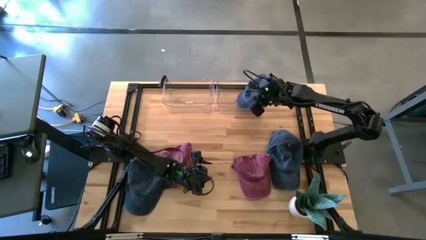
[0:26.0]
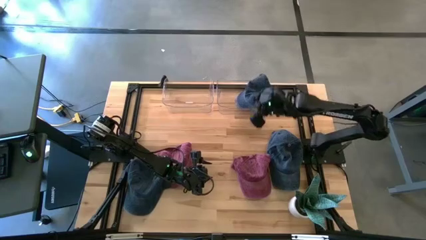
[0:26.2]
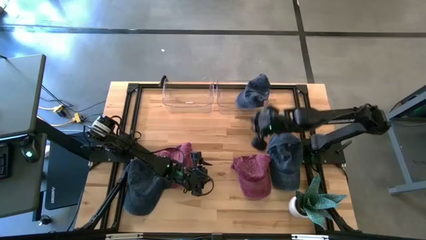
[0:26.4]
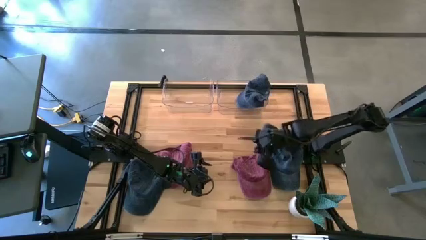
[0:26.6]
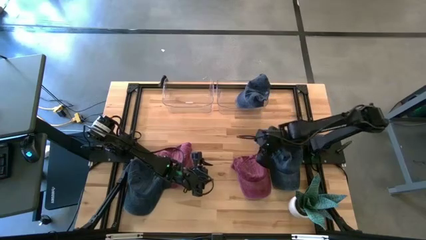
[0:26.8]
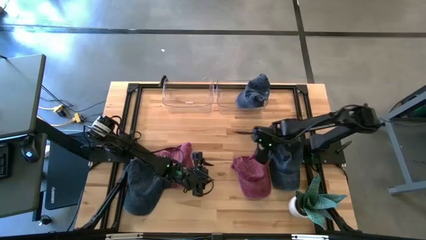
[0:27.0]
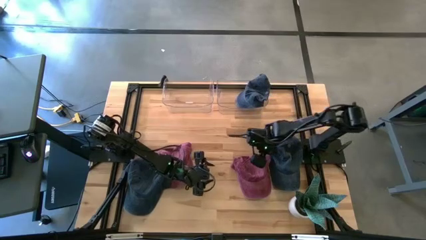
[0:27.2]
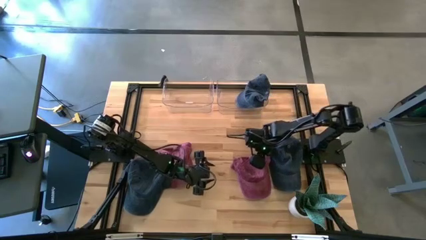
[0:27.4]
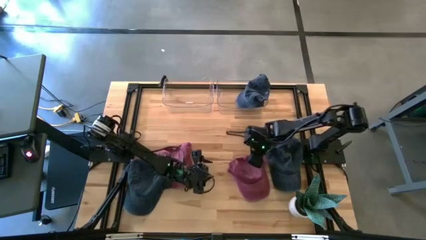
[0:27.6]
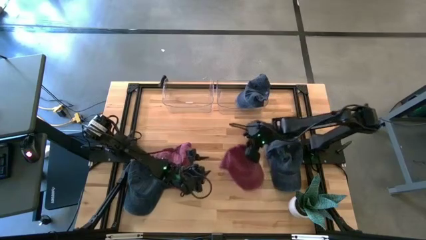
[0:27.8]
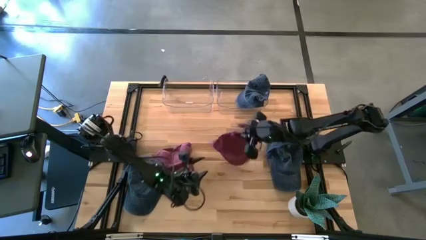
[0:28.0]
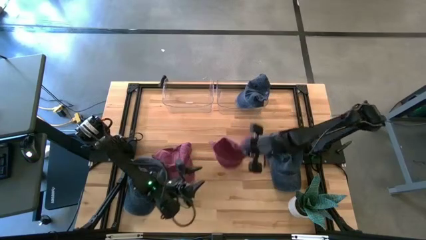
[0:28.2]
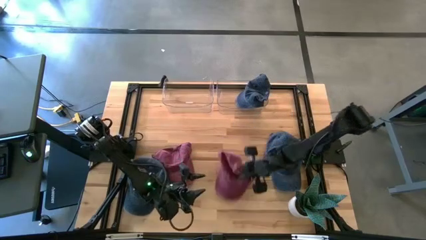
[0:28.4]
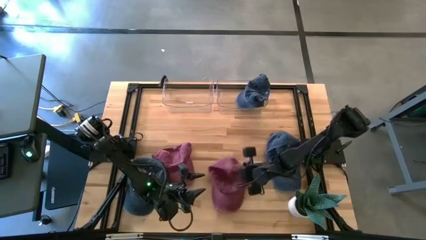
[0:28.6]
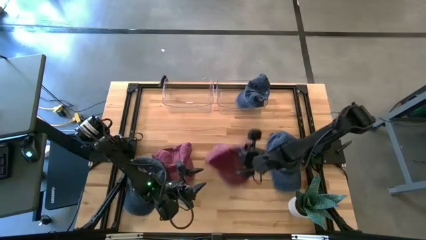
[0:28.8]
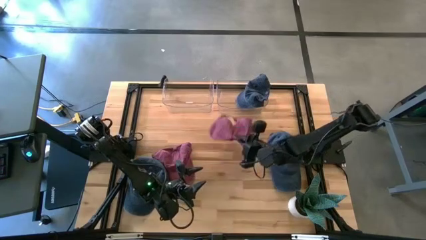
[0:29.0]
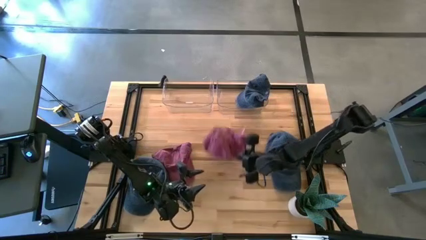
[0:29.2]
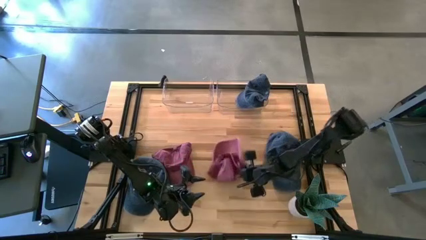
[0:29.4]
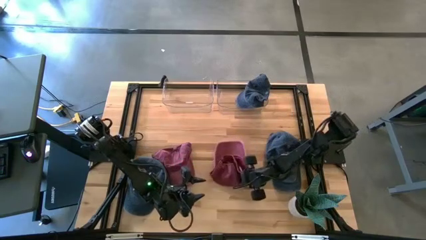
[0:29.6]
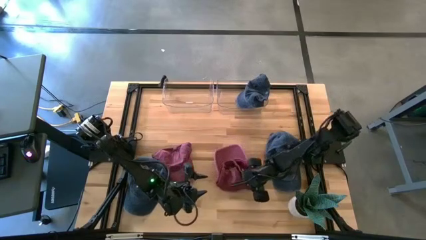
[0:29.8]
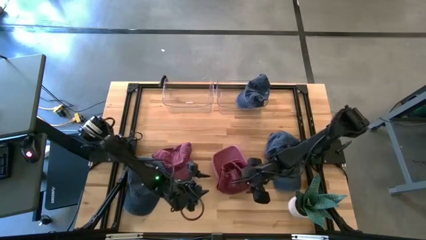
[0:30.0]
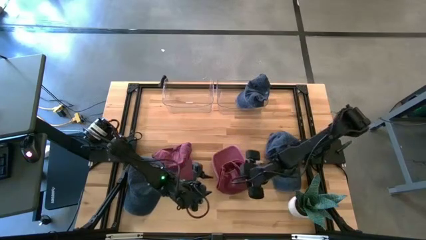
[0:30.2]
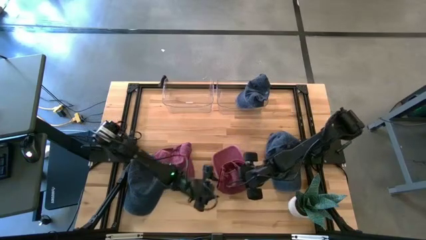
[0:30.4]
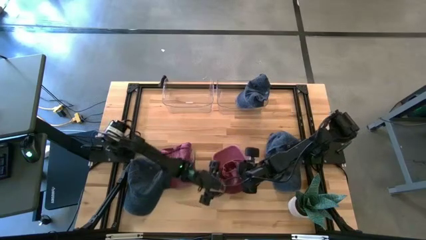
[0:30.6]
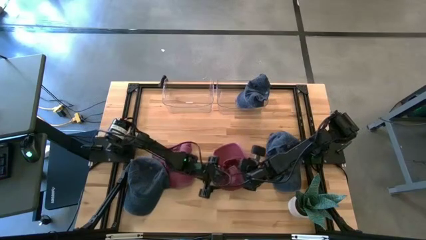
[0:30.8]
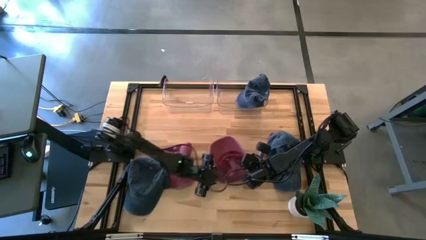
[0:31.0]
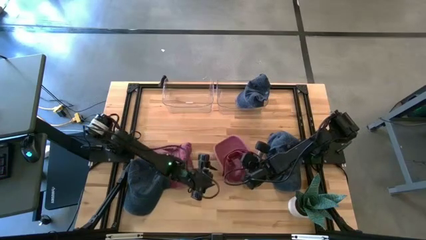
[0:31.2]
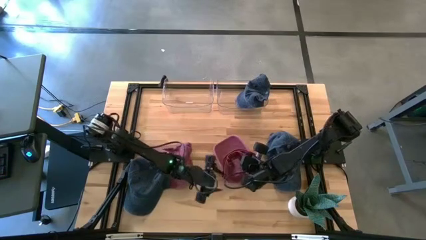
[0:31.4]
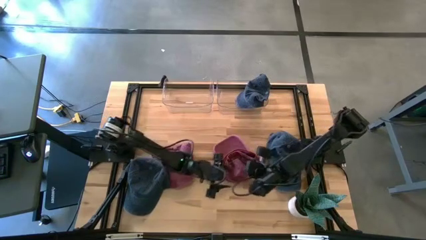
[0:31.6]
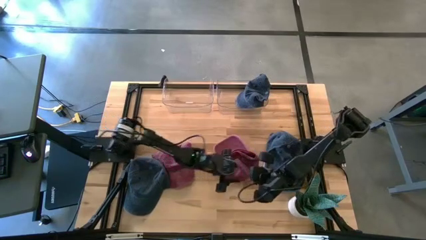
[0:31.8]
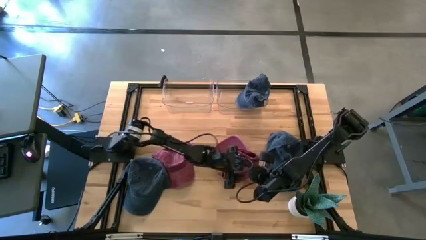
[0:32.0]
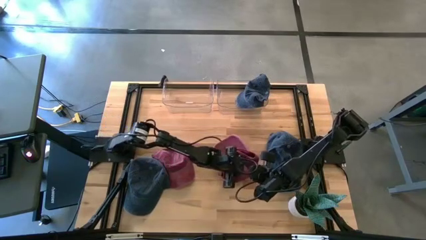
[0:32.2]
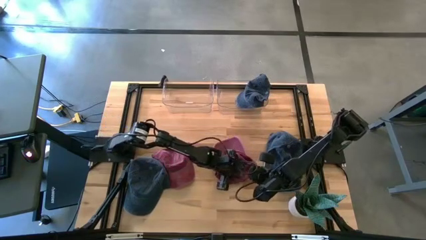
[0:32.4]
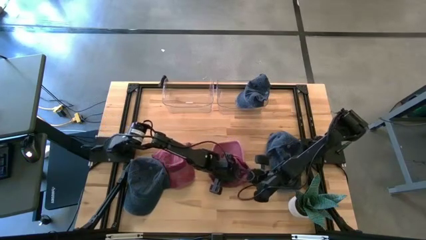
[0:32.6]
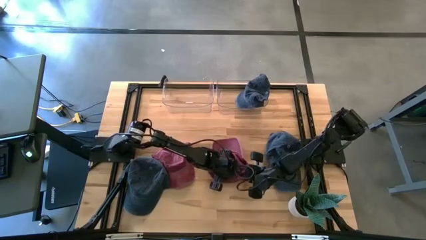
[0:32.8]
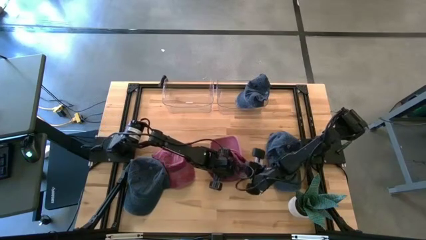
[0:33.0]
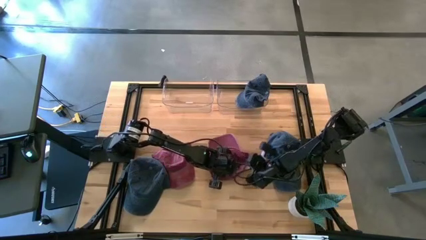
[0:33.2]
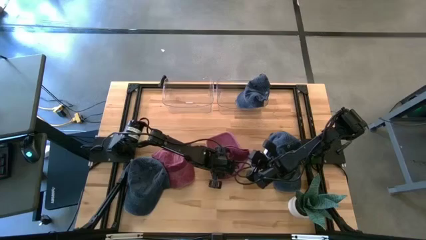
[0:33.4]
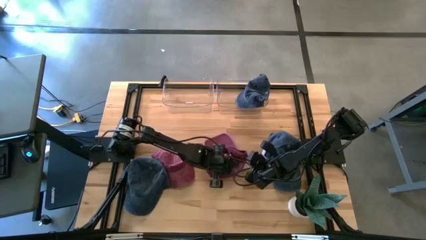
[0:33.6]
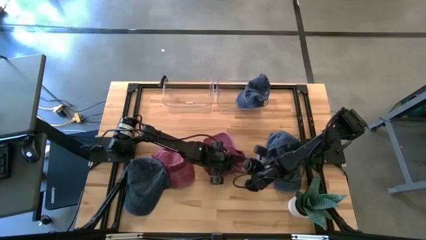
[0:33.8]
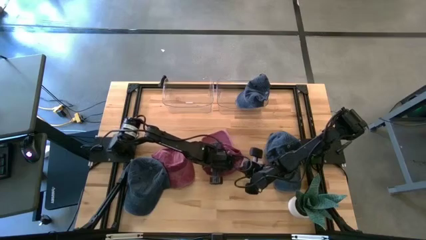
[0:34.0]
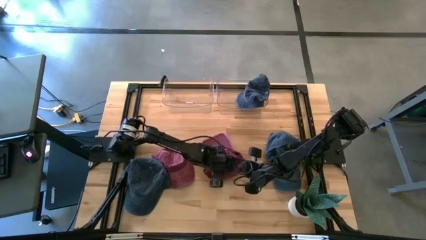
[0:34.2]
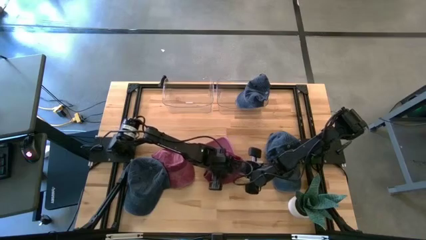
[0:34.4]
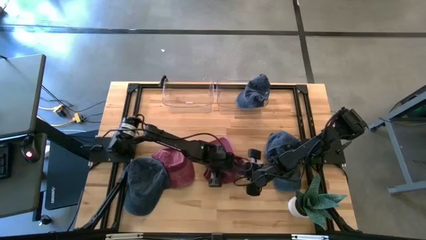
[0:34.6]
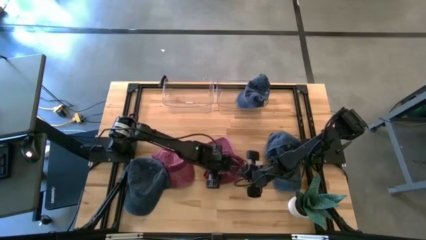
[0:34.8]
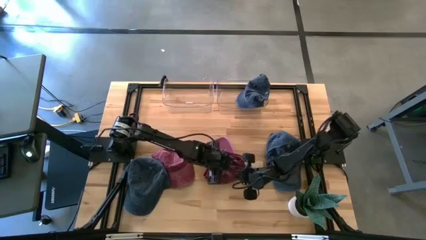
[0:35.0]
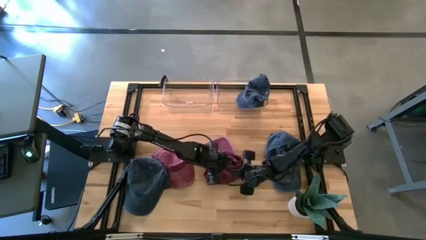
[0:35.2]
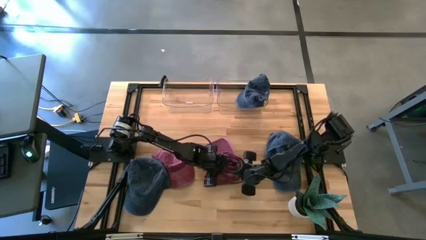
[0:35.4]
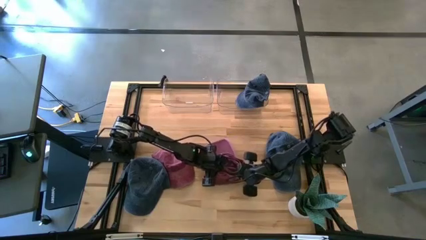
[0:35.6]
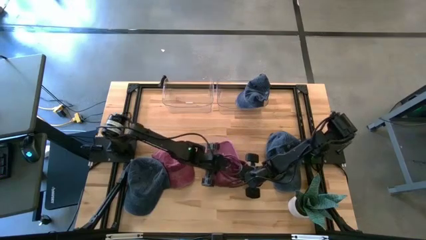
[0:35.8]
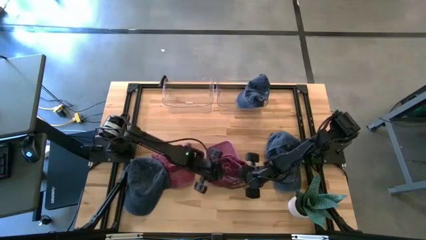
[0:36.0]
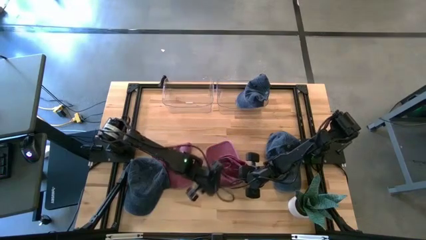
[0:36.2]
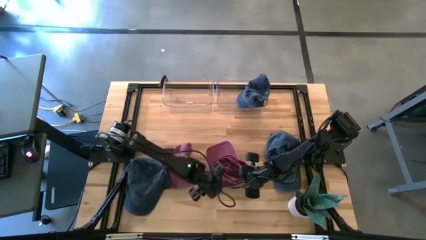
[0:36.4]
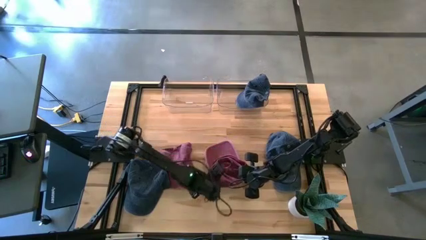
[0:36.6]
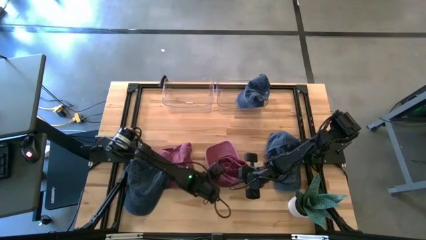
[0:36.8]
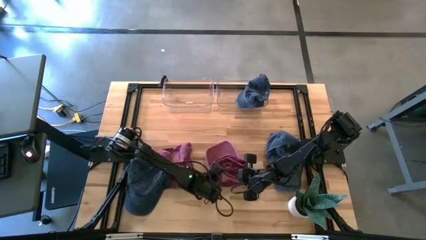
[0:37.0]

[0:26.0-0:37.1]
Task: Pick & Place hat
Put the right red cap into the left transparent bin

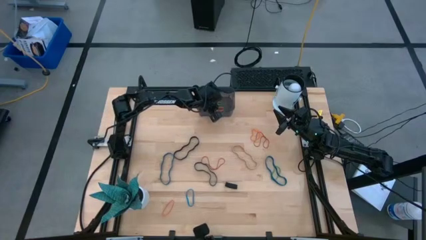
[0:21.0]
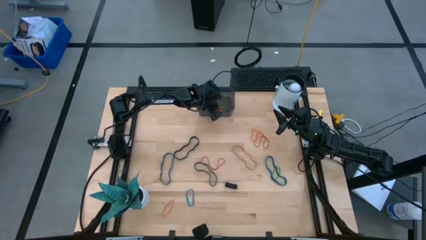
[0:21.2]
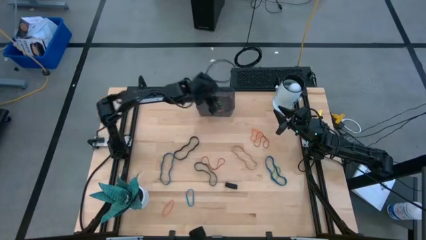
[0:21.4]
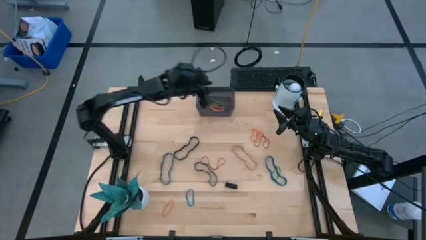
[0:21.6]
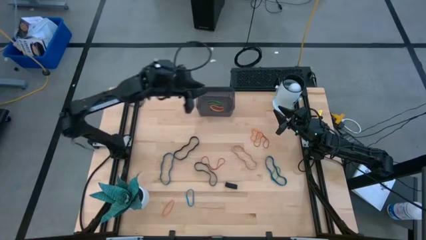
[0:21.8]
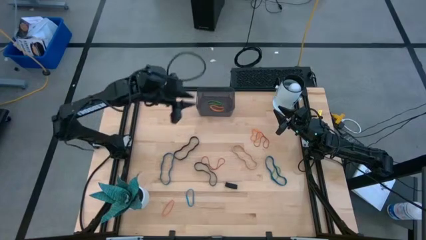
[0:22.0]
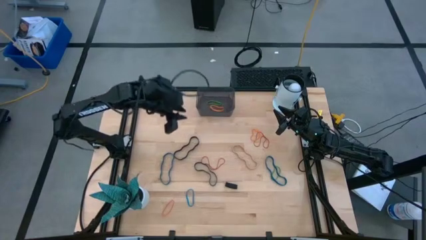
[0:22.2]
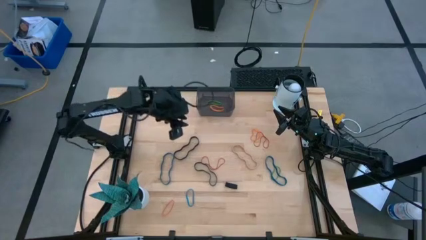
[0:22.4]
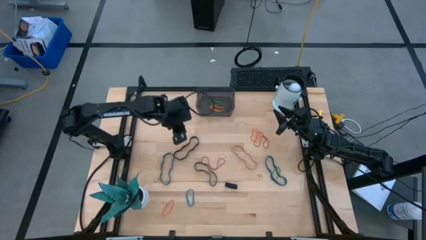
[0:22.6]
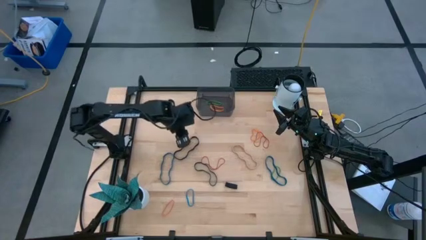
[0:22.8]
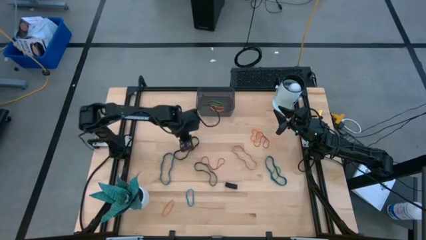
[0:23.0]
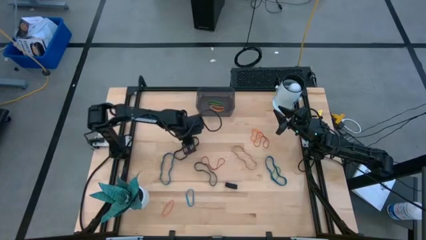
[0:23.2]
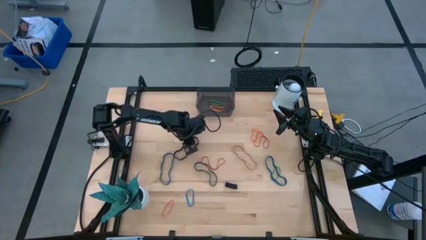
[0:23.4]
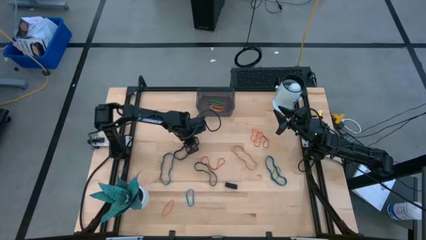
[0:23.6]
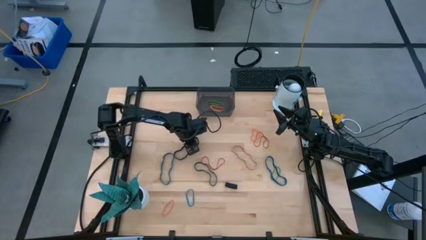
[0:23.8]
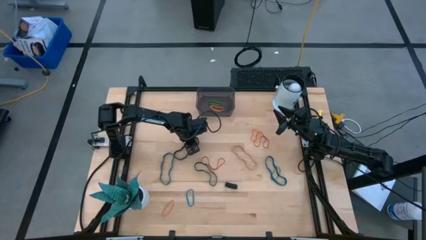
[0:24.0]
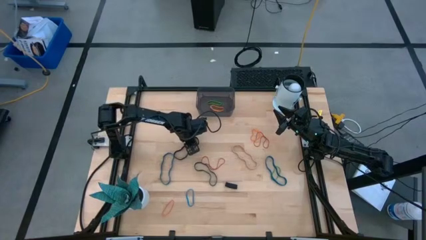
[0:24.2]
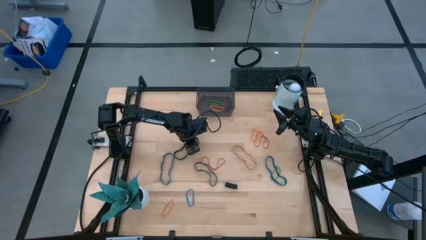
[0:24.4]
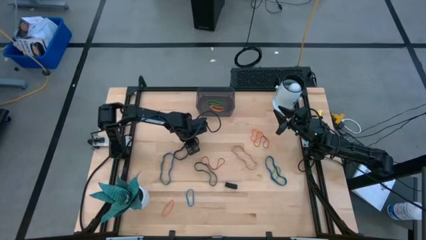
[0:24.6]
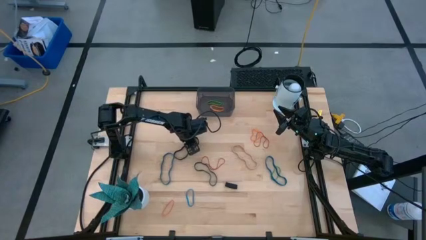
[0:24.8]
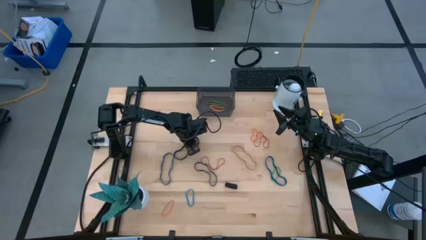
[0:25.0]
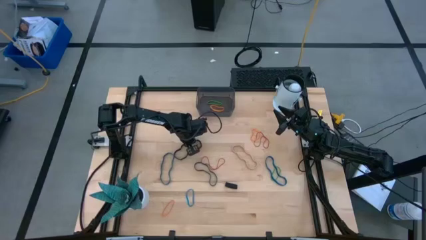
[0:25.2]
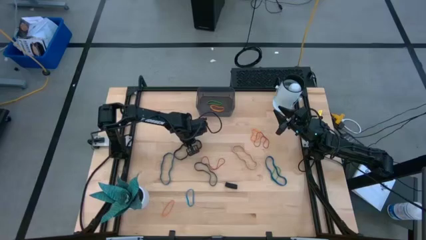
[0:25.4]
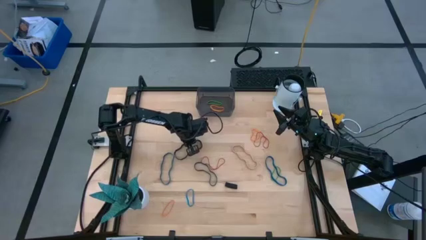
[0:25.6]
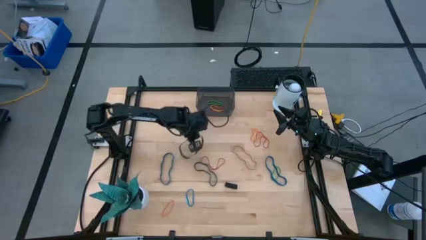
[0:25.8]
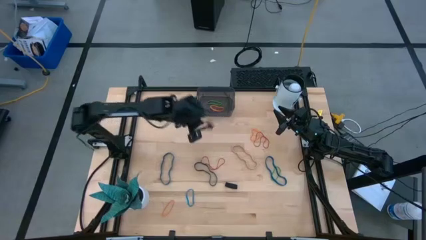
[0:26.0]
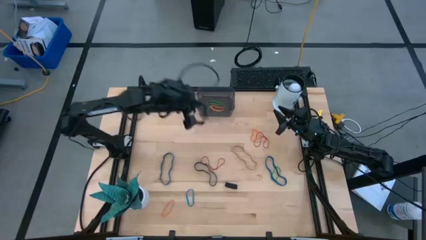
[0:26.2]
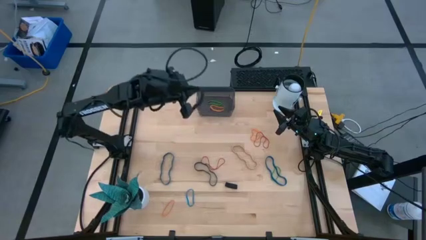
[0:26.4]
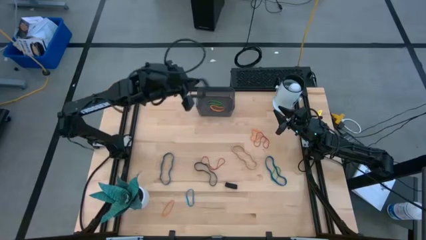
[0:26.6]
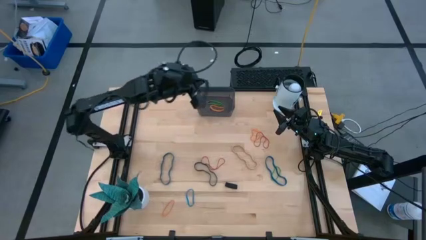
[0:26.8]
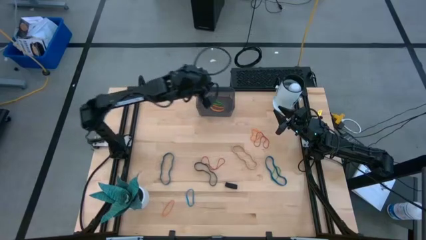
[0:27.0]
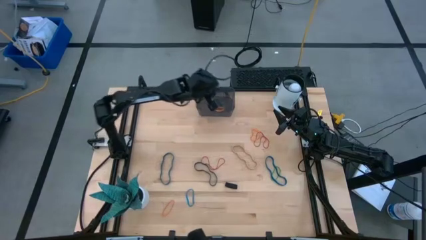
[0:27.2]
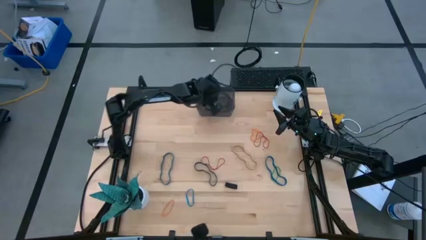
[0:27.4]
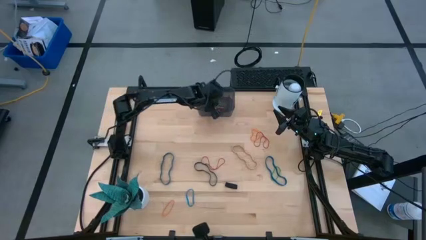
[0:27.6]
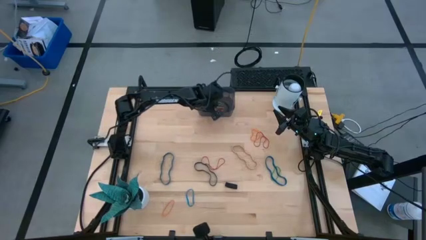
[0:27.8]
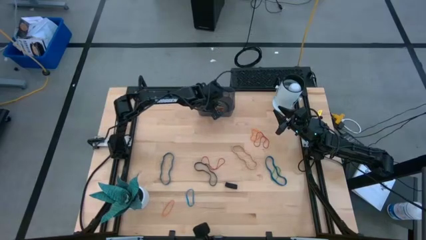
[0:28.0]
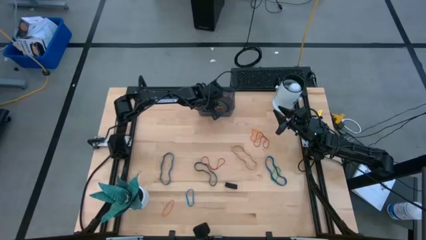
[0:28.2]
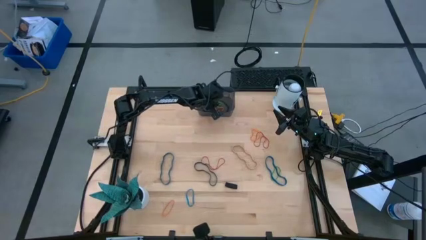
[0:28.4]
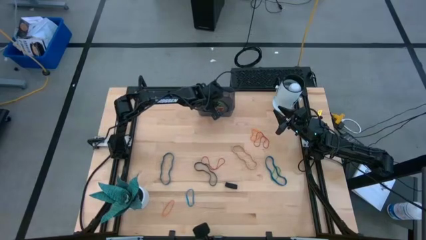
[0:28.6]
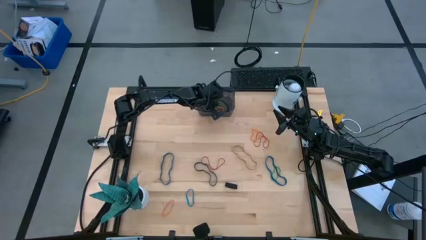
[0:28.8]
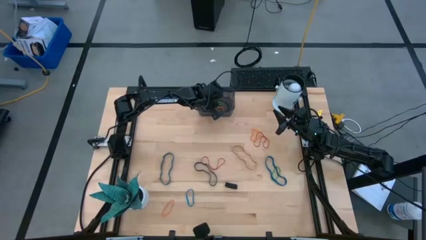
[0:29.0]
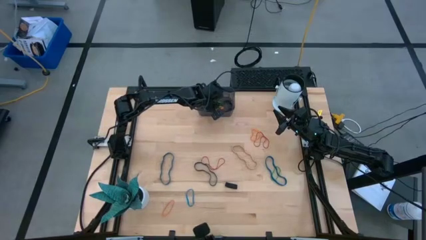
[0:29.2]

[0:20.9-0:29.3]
Task: Pick and place rubber bands into bin
Put the top black rubber band into the black bin
